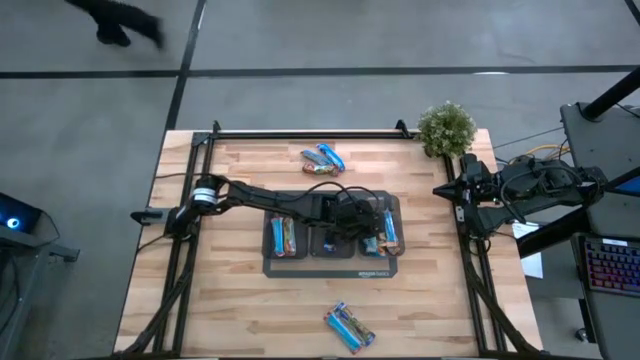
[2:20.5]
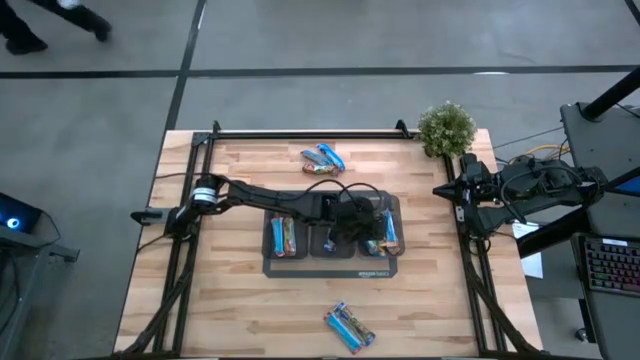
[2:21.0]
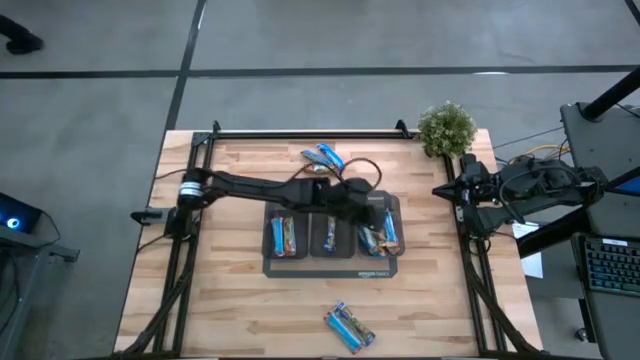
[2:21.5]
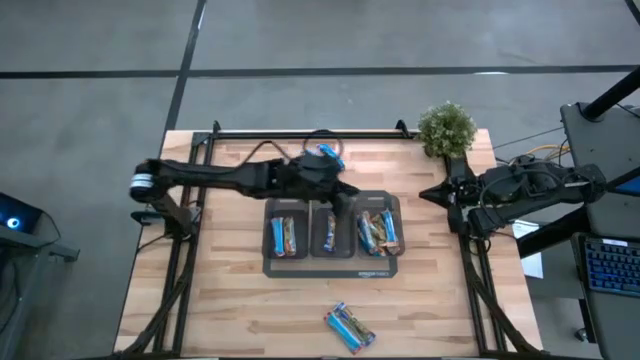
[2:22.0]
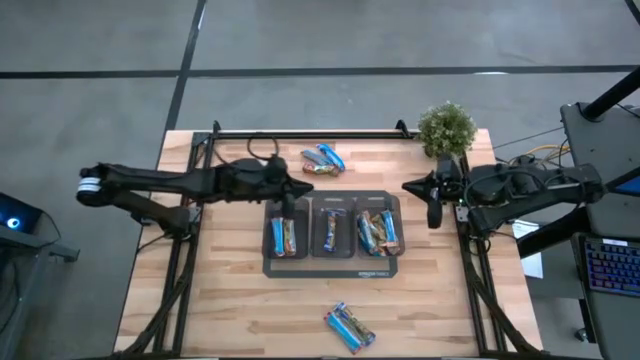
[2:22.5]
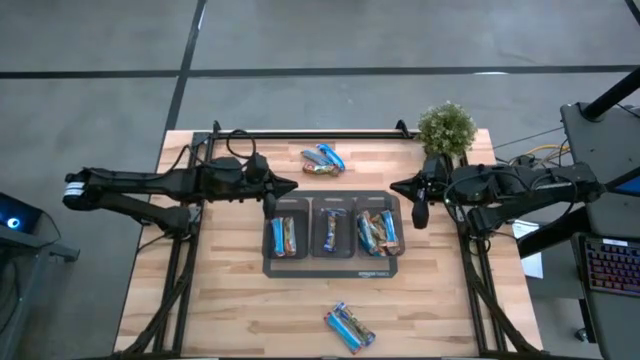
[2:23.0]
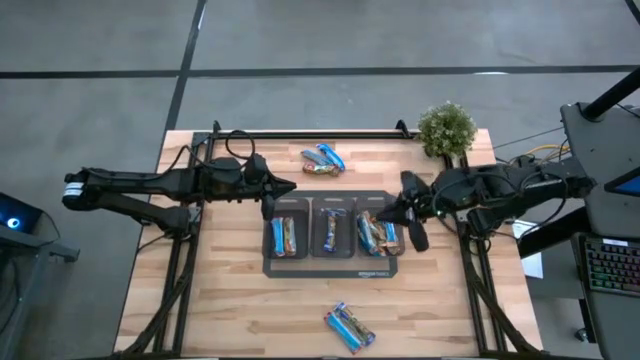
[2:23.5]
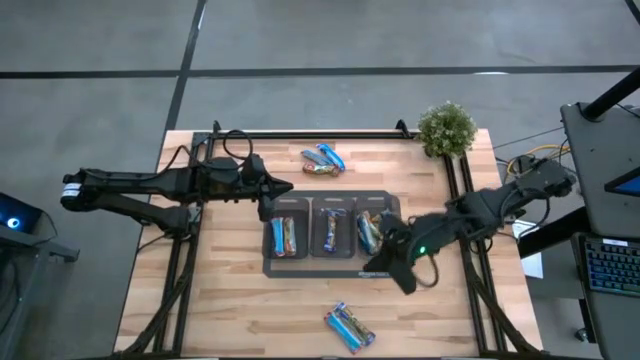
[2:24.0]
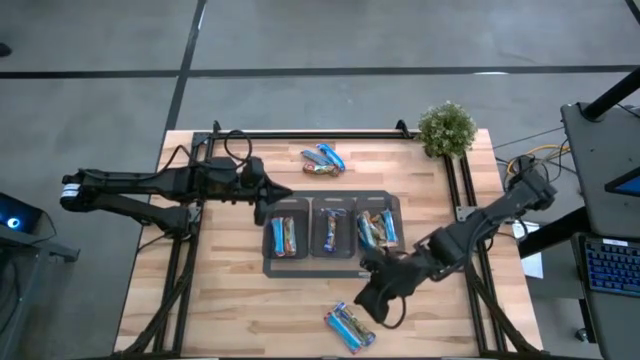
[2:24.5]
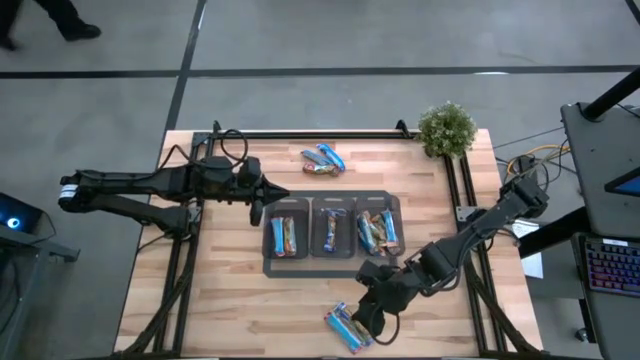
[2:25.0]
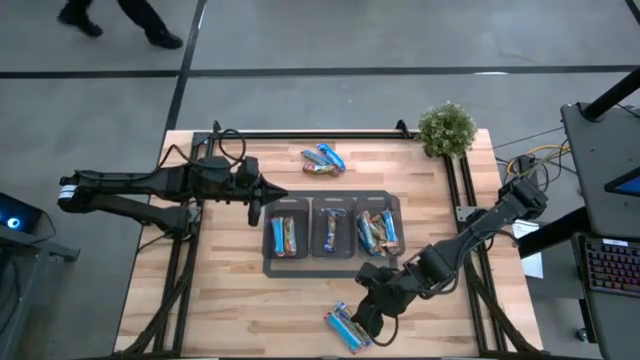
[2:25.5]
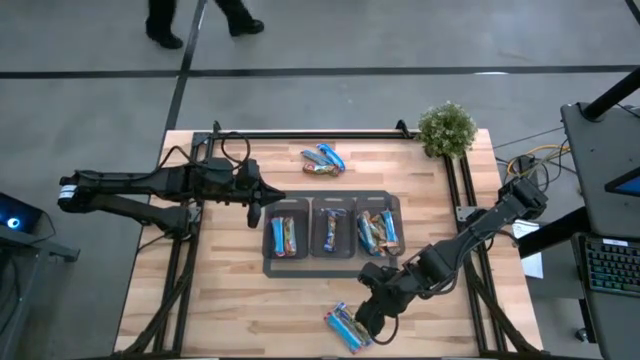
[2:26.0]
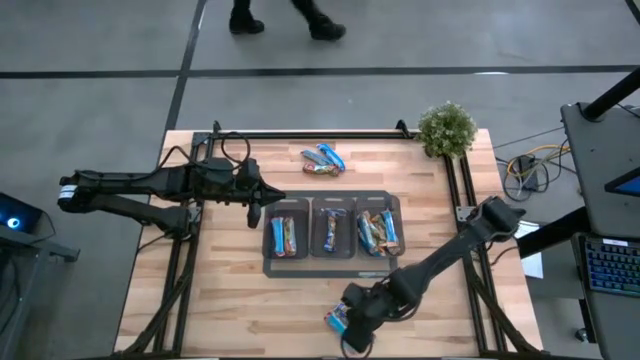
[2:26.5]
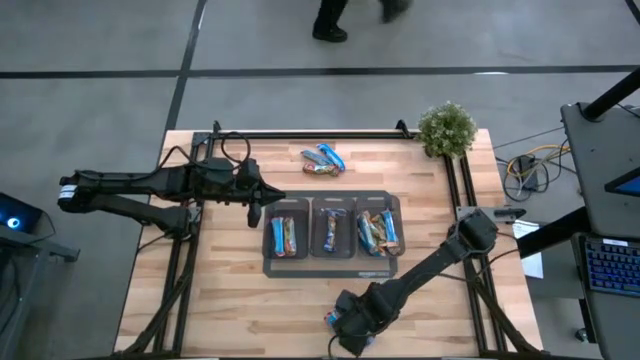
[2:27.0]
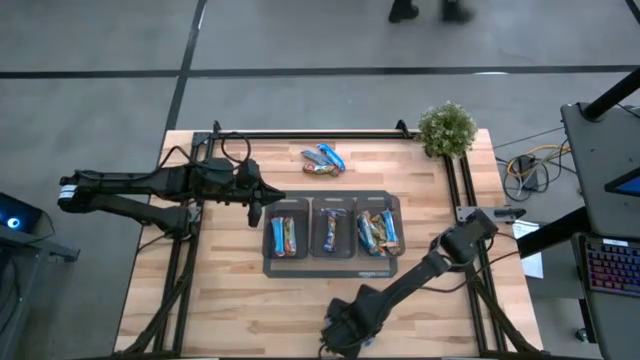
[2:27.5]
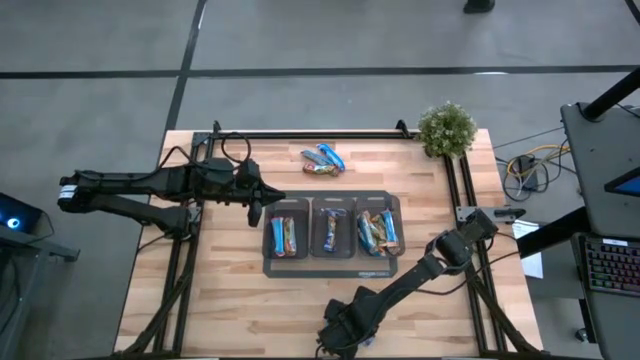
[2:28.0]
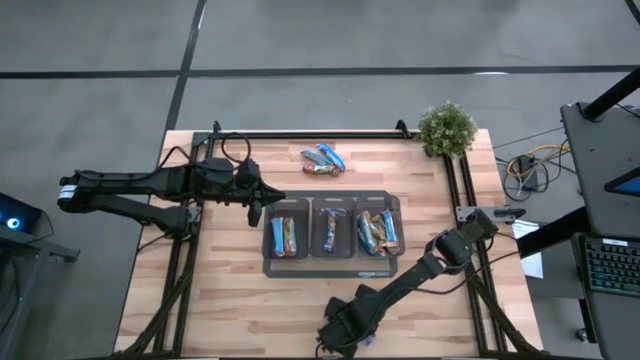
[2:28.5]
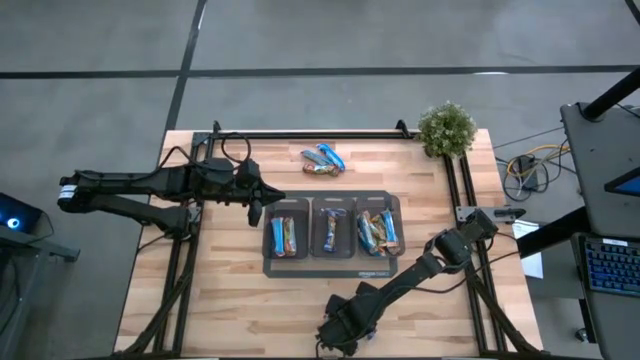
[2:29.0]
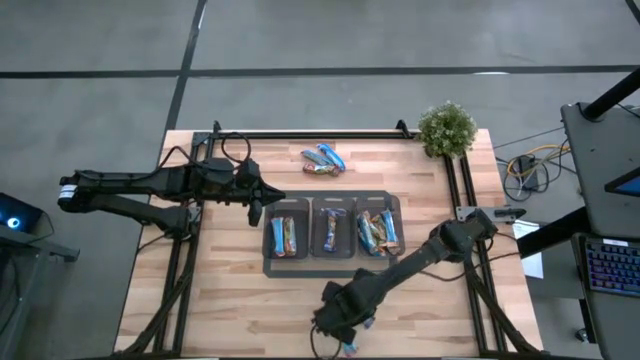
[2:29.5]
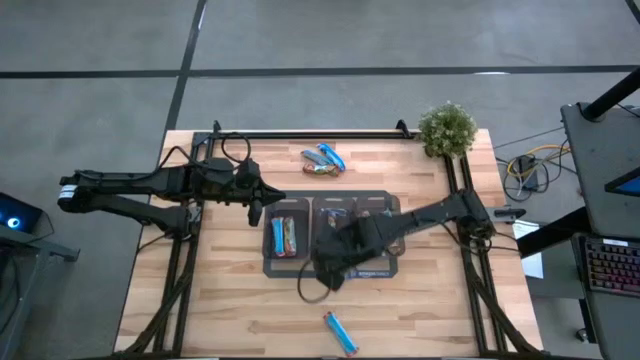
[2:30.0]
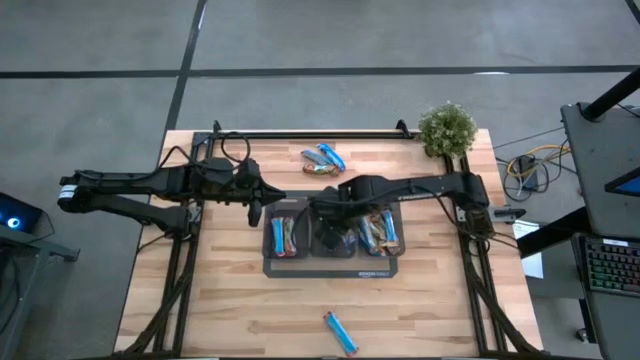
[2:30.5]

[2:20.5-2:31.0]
Task: Pick and place Granola Bars by type
Put the blue granola bar into the middle black bin

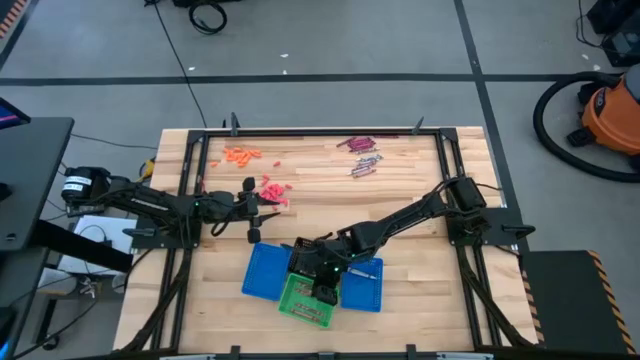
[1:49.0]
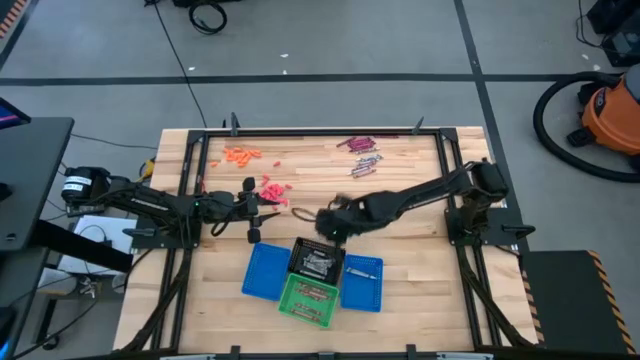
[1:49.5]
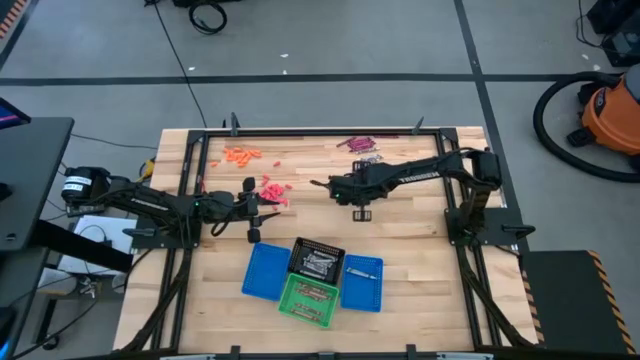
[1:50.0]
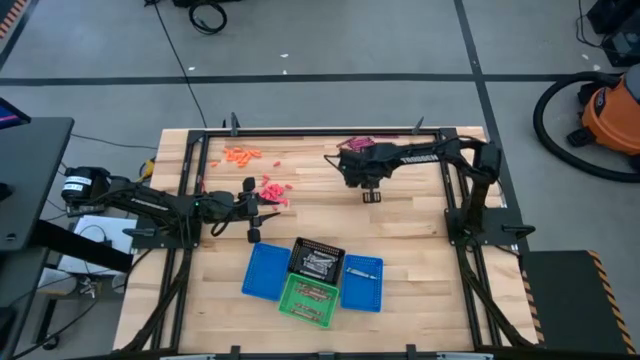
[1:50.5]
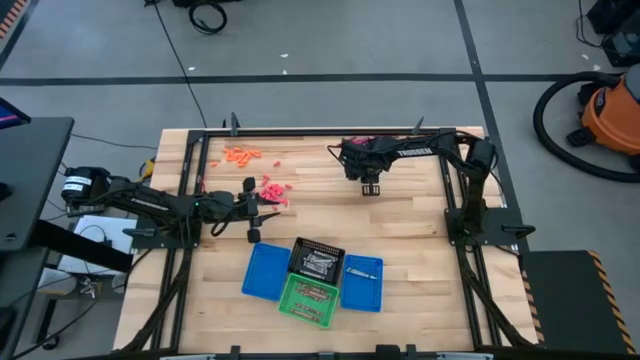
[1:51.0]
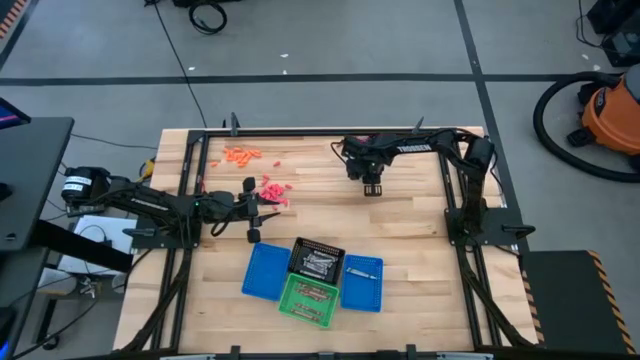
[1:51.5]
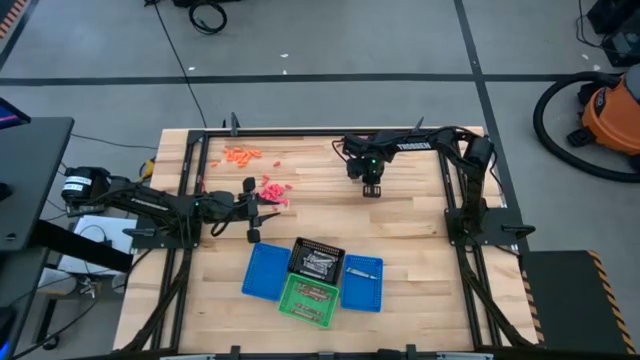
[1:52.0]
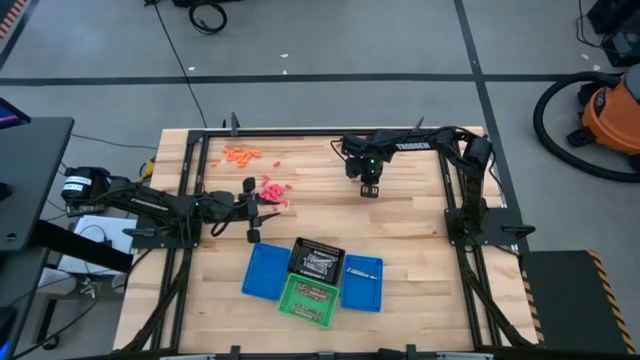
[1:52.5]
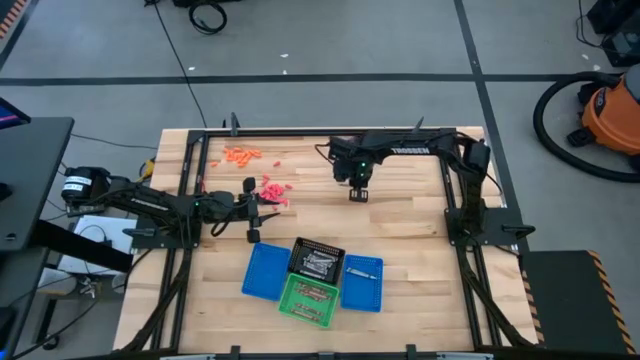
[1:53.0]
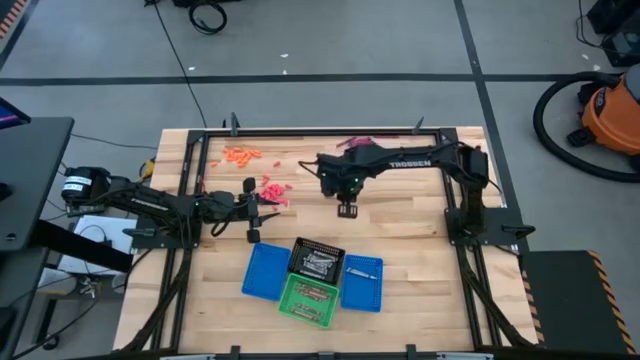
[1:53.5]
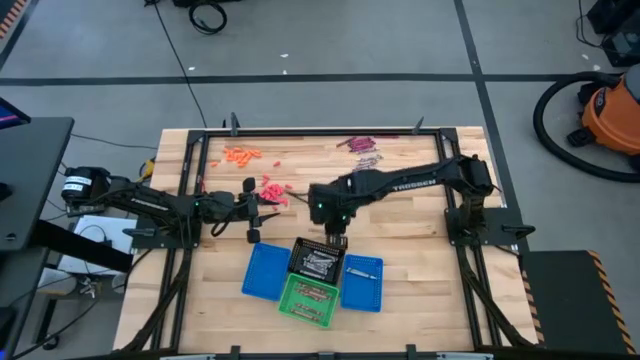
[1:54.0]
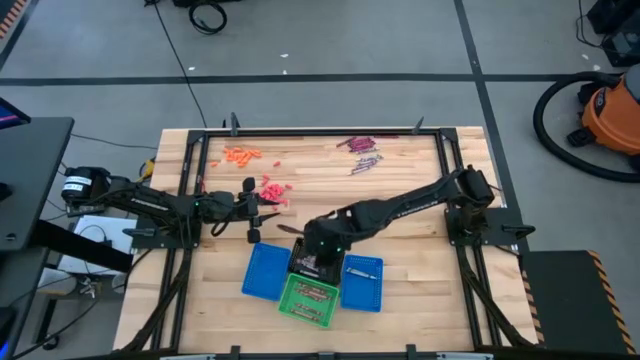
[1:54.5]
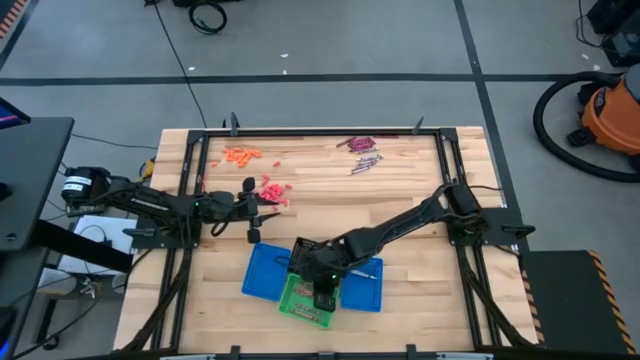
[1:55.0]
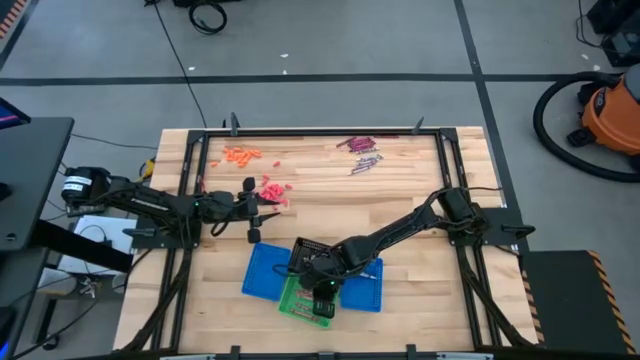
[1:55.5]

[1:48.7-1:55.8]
Task: Sort crayons
Put the pink crayon into the green bin

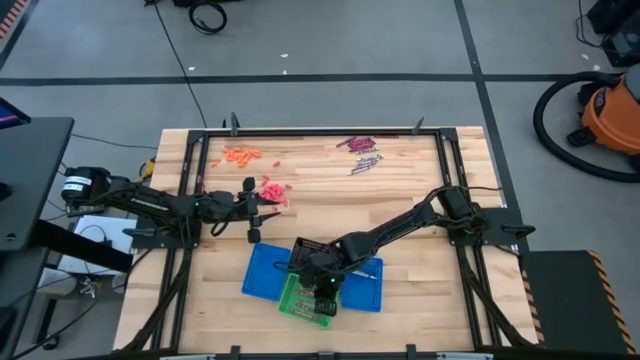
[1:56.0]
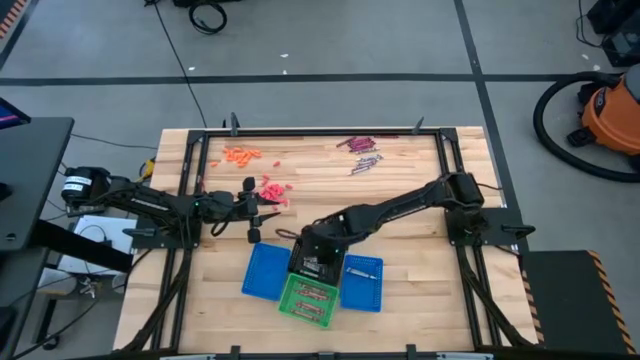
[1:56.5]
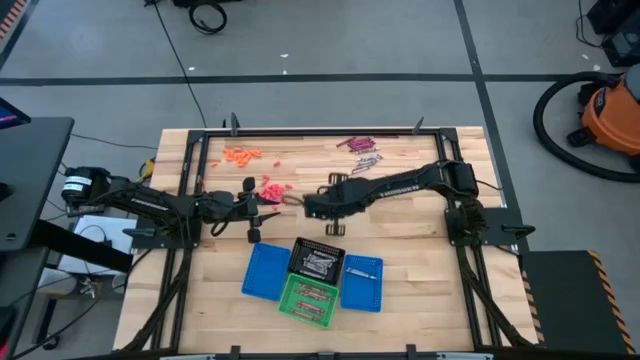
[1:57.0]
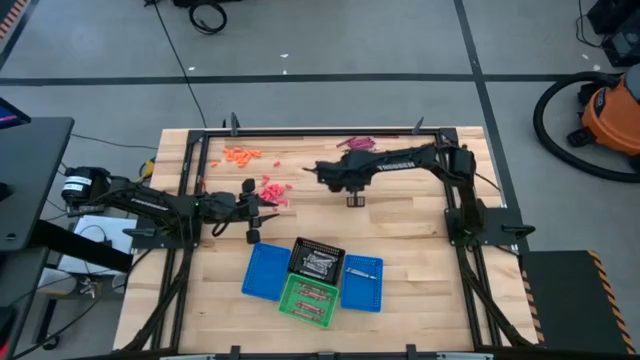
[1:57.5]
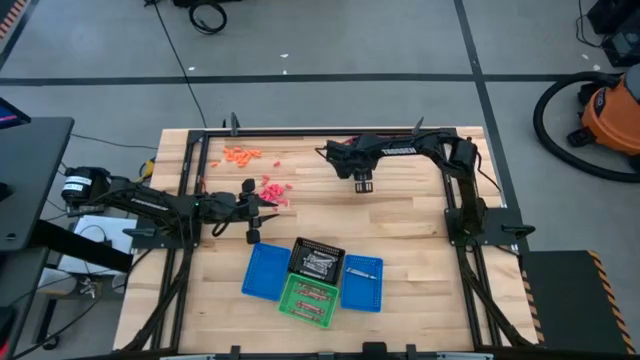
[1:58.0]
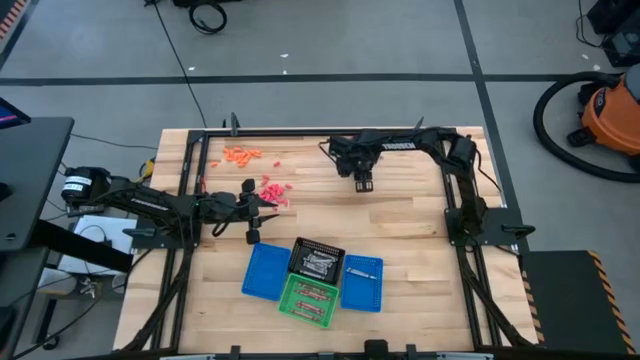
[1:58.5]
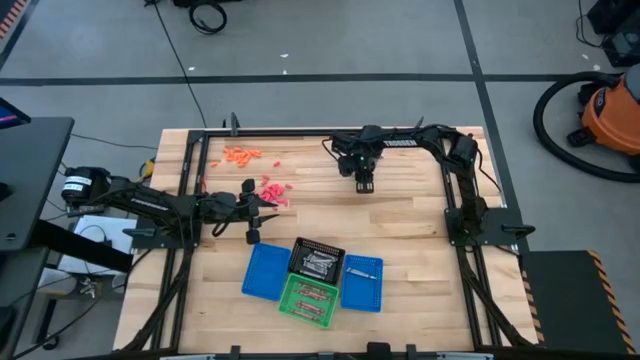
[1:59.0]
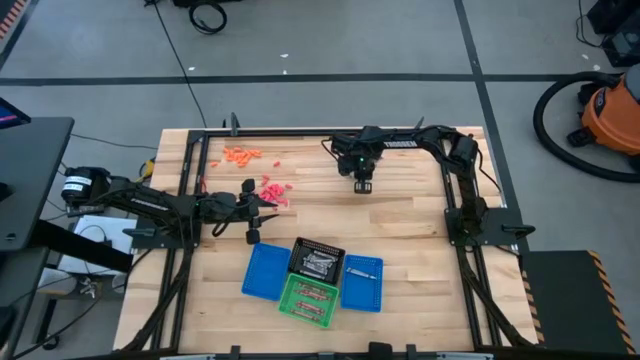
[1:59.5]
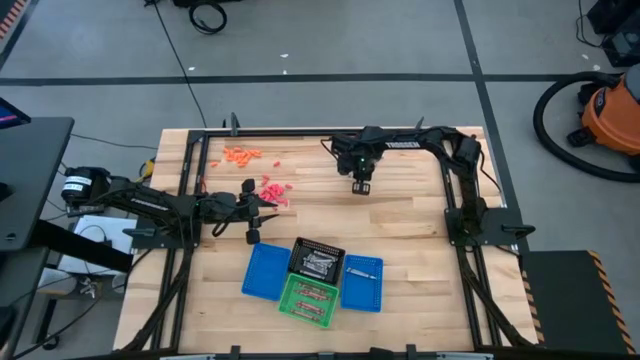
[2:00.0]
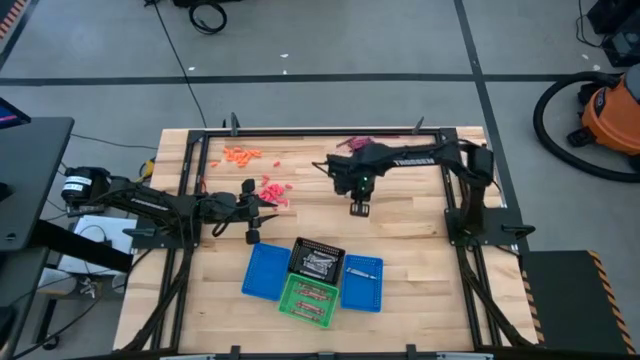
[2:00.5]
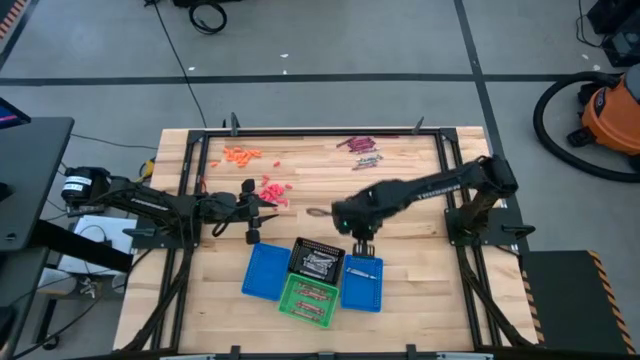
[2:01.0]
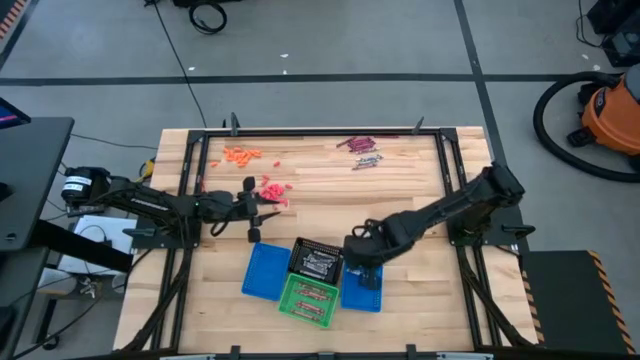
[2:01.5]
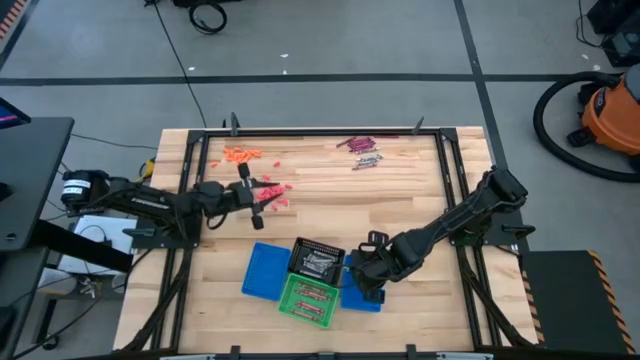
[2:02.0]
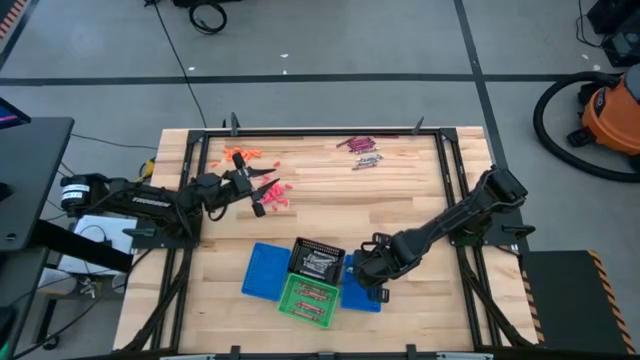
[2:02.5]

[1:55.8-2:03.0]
Put the white crayon into the right blue bin
